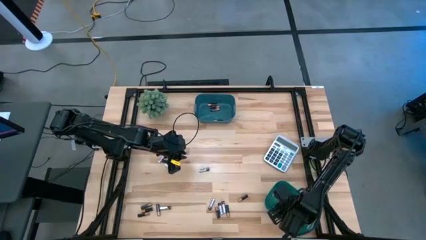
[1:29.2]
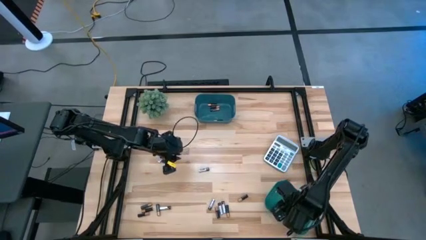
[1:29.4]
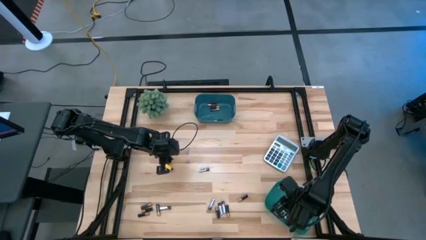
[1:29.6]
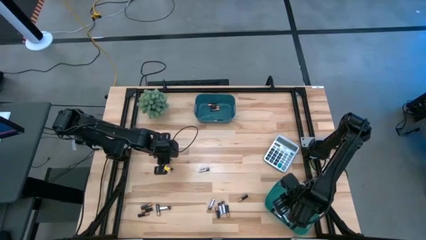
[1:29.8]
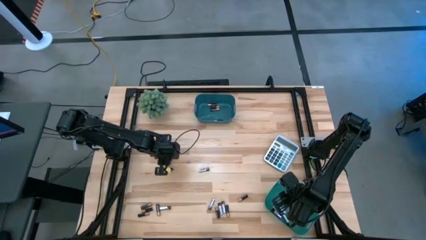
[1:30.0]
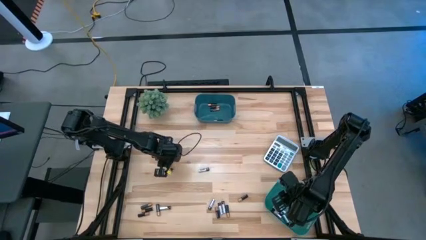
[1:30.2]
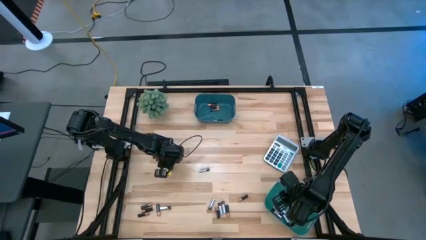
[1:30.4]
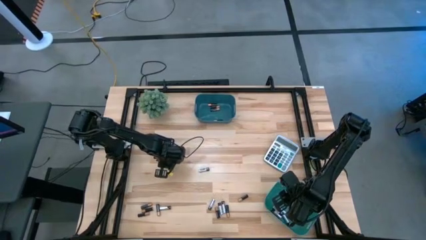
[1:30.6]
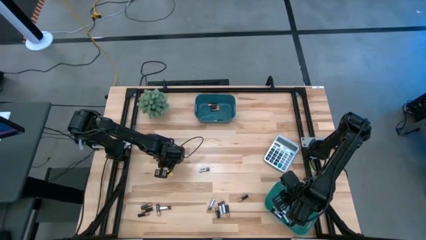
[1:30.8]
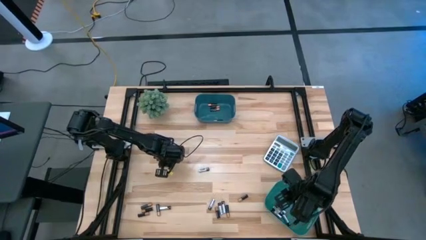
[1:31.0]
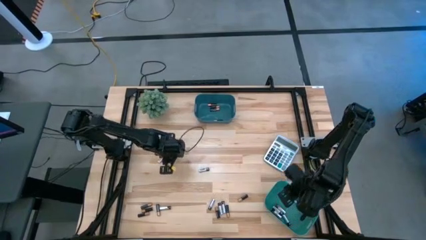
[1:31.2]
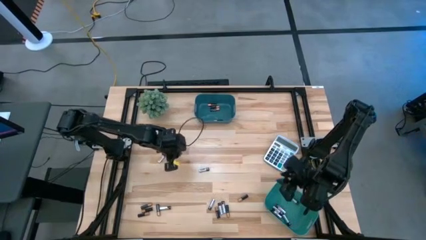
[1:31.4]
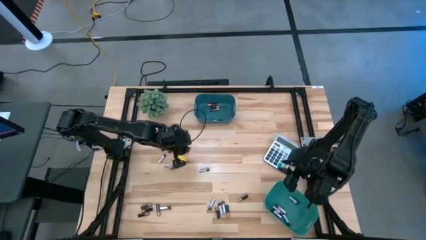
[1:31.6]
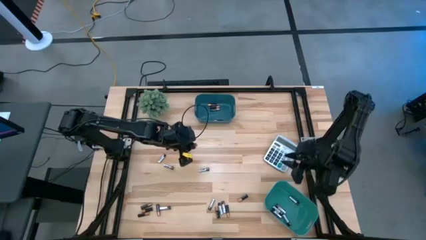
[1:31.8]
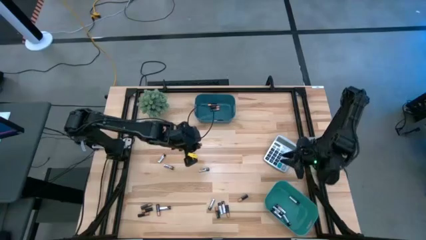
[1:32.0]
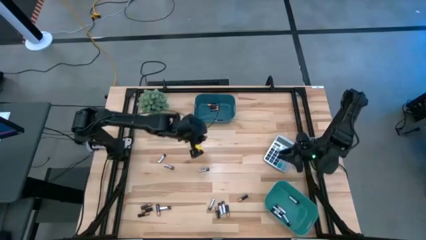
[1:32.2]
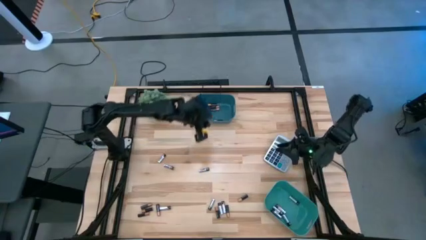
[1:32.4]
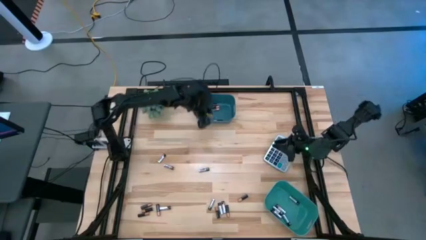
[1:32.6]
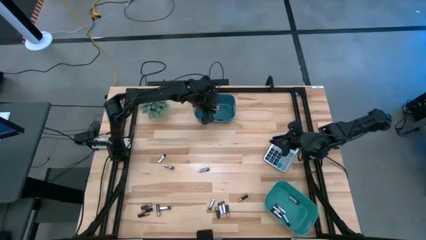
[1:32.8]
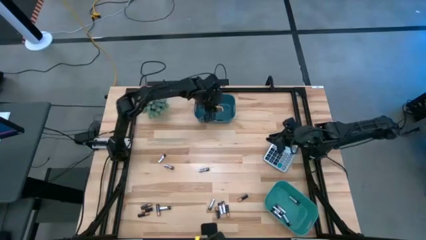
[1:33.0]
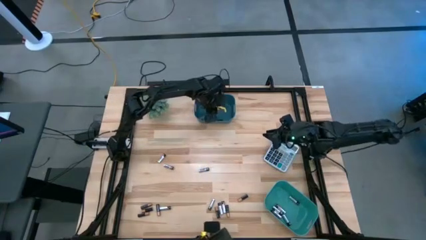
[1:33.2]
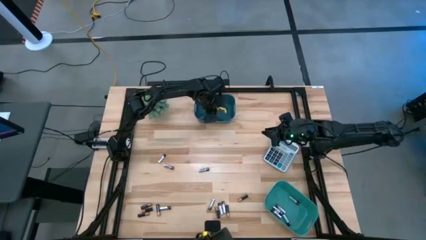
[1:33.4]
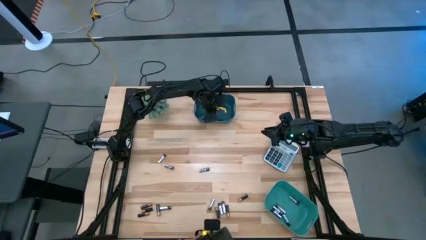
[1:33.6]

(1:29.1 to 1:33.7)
Task: Sort batteries
Put the black battery into the blue bin

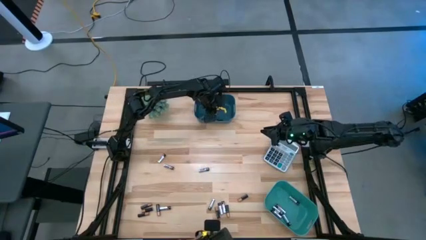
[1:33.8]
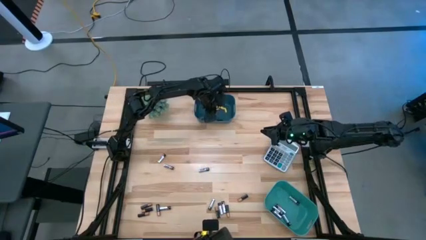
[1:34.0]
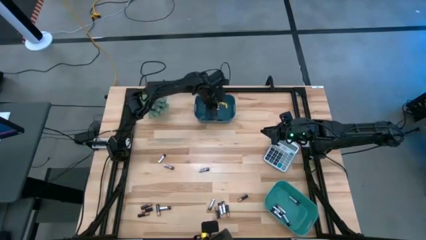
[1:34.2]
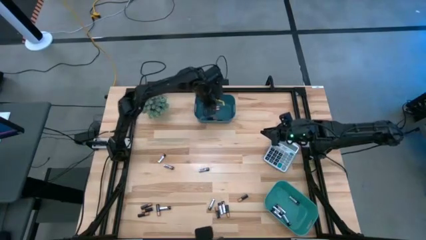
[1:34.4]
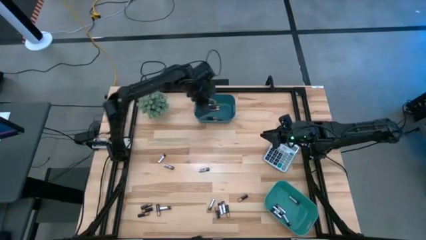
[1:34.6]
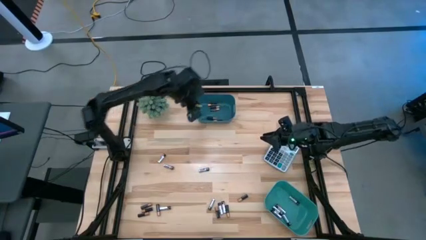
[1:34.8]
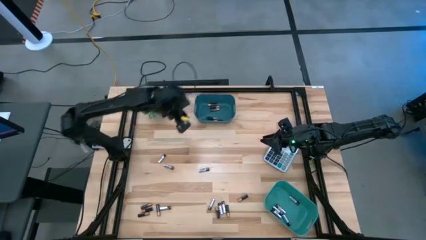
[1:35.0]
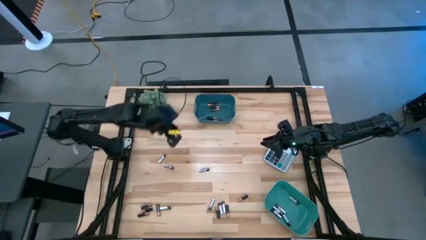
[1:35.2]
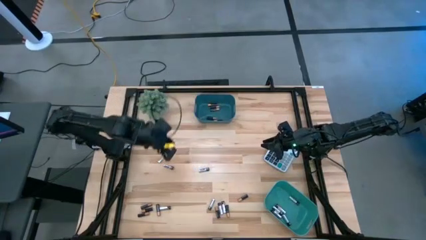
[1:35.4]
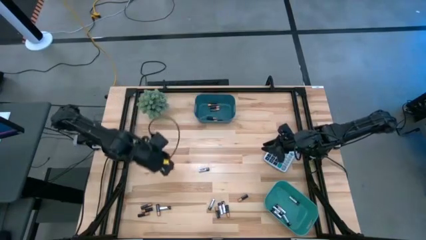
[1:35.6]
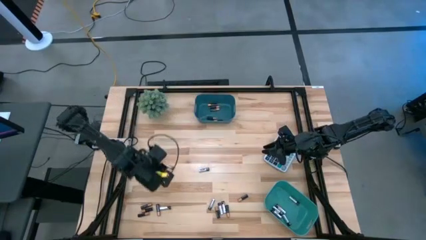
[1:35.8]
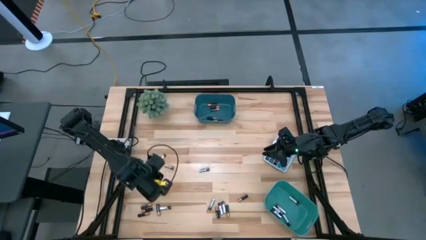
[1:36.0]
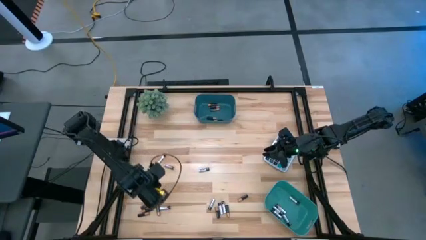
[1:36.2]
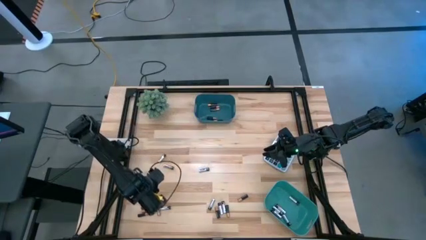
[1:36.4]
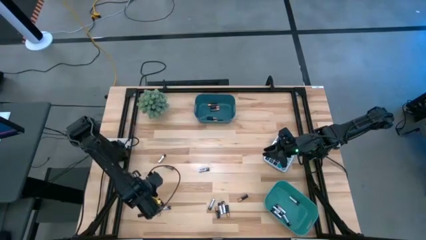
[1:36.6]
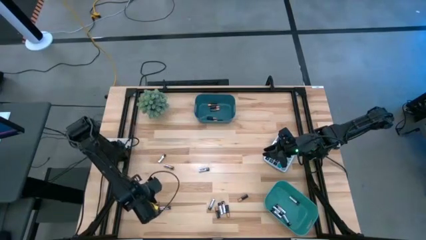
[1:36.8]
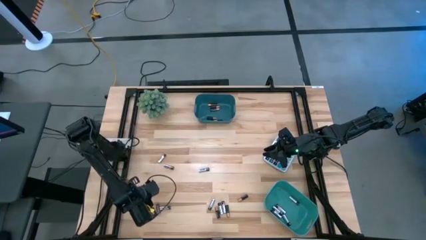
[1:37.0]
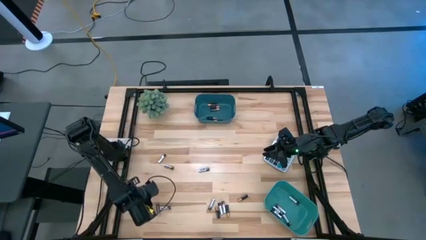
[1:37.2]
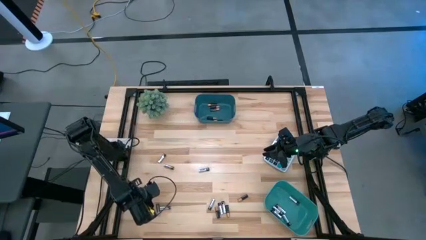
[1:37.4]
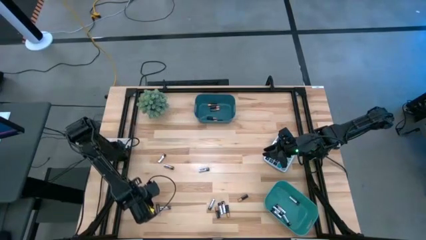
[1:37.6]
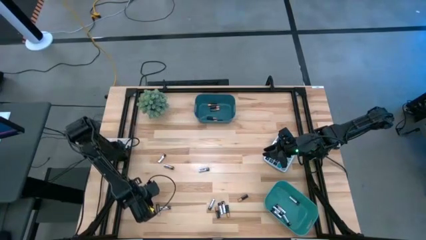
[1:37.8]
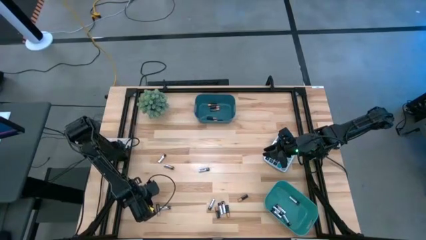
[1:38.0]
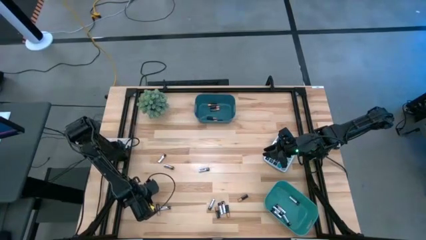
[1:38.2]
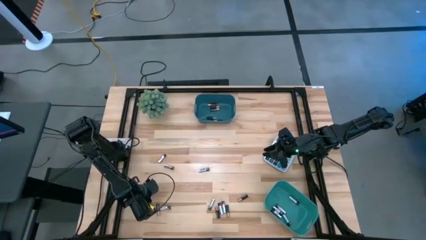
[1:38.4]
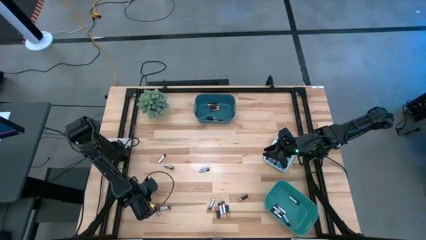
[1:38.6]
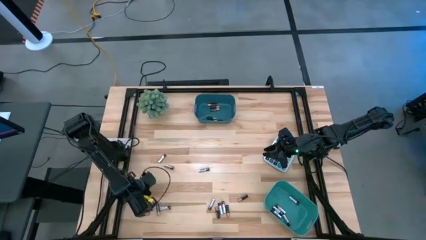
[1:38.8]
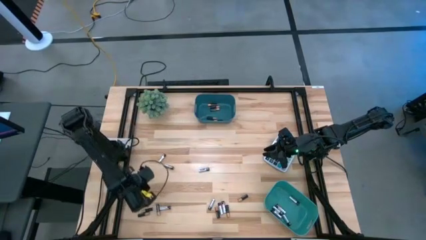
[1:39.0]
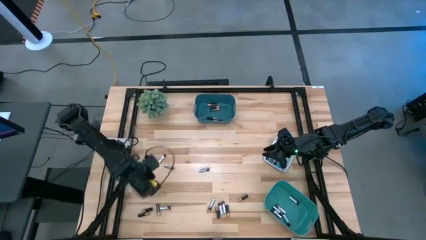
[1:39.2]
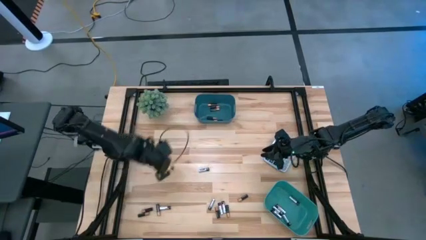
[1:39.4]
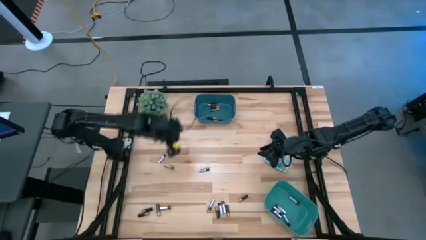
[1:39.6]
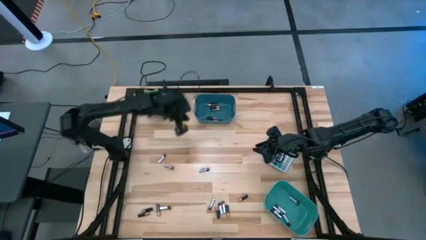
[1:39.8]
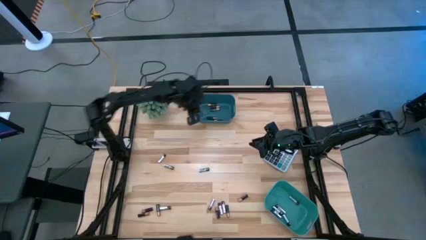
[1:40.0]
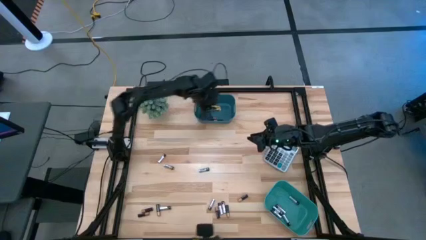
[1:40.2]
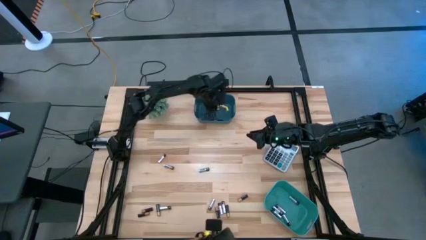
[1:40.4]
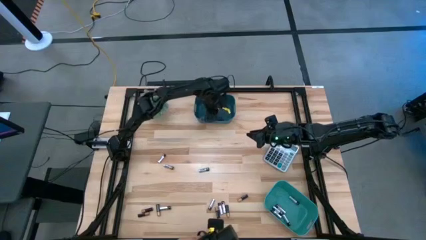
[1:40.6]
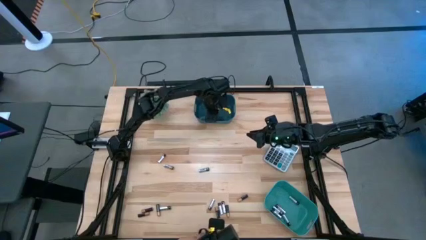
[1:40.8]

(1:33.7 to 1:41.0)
Put the black battery into the blue bin

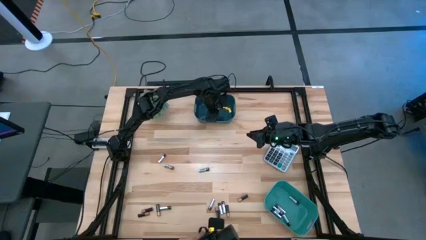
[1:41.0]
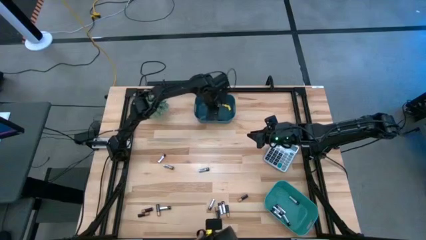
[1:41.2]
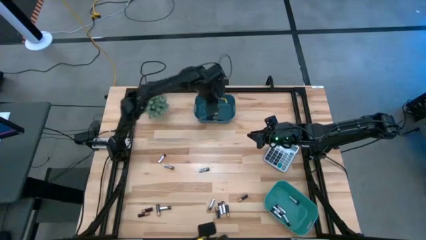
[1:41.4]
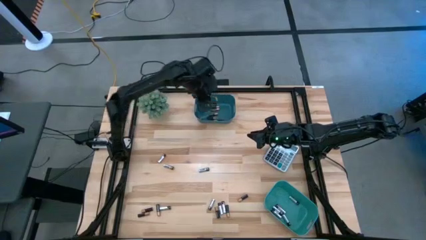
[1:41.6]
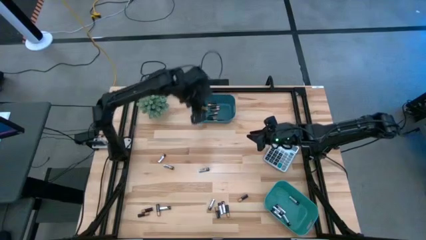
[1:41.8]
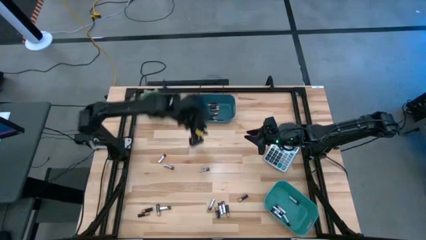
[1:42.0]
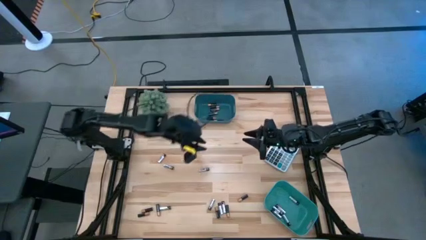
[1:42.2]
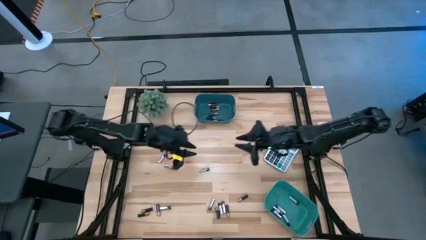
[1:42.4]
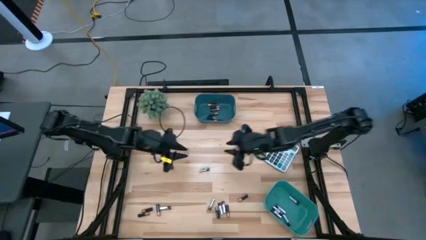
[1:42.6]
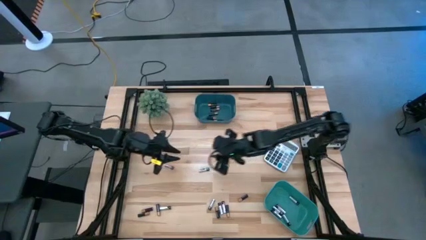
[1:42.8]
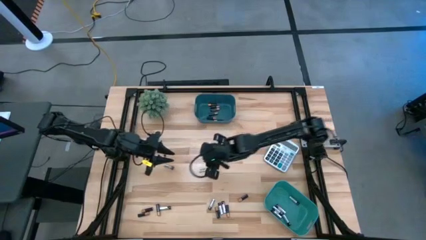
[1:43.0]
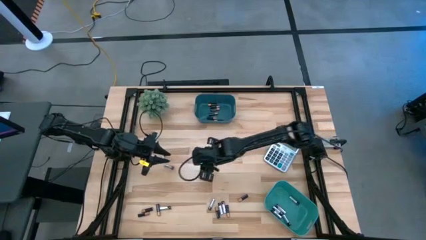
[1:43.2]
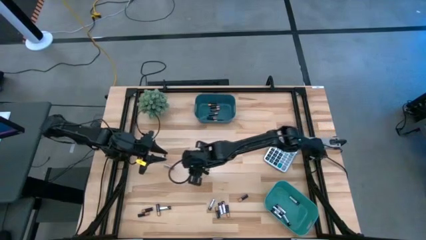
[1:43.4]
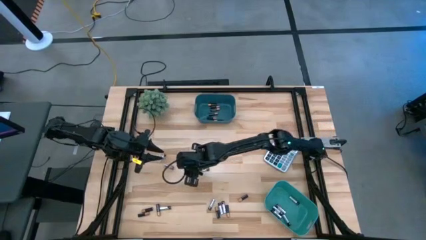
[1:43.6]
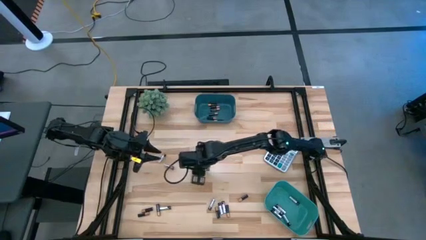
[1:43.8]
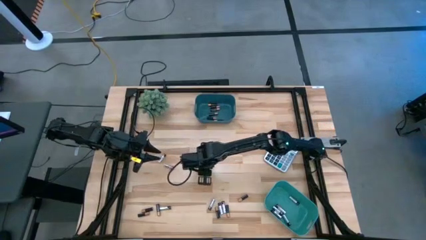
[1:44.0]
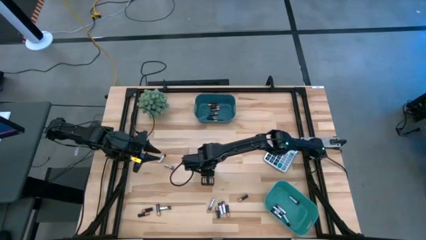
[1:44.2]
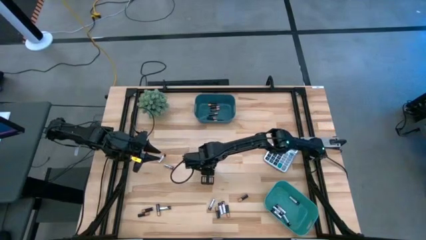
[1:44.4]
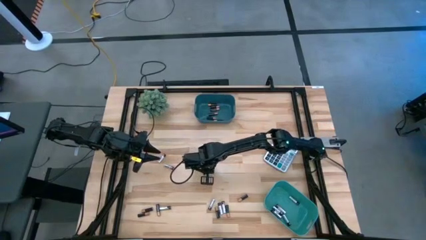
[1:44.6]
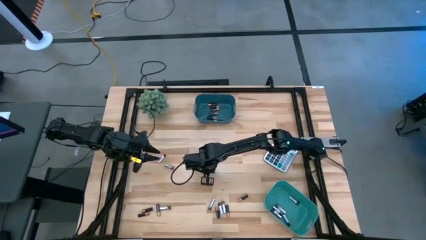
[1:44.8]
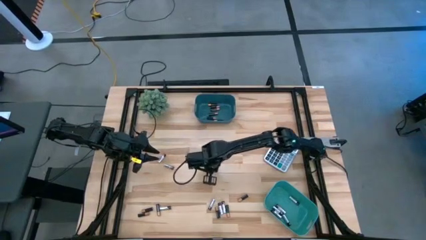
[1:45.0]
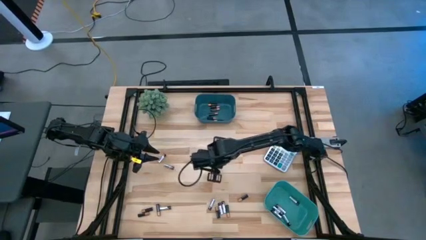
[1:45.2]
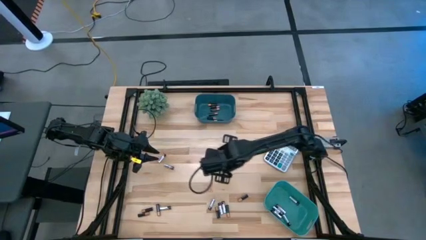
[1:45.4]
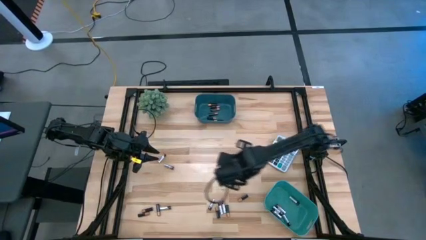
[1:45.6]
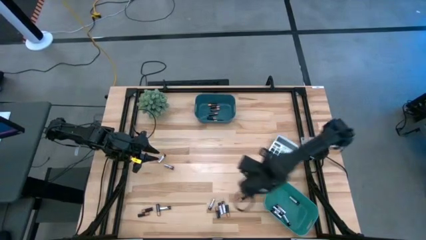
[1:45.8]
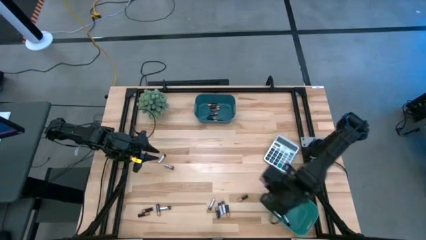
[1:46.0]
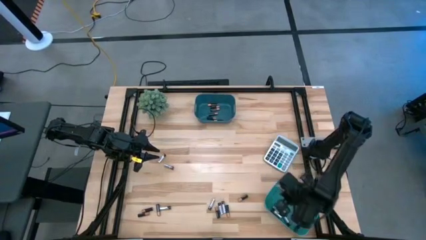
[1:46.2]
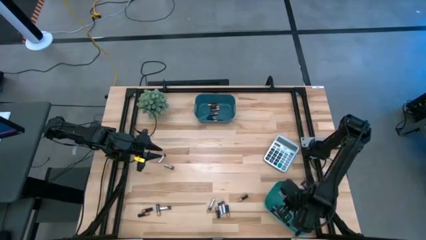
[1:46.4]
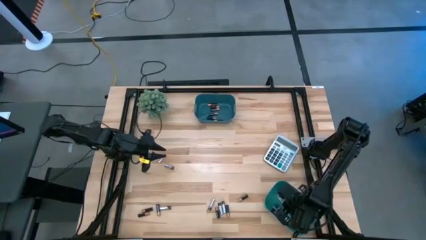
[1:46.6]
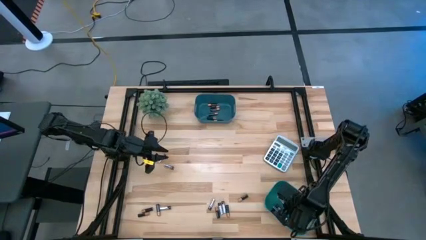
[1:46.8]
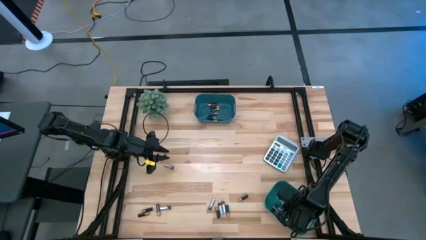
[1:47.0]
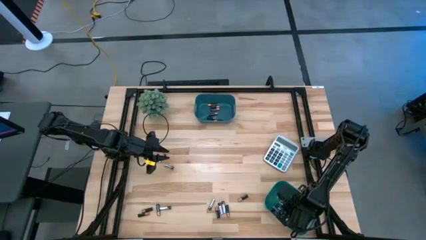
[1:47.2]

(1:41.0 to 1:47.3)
Put the silver battery into the green bin
